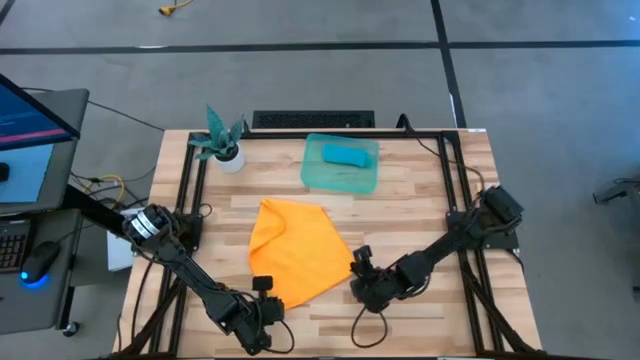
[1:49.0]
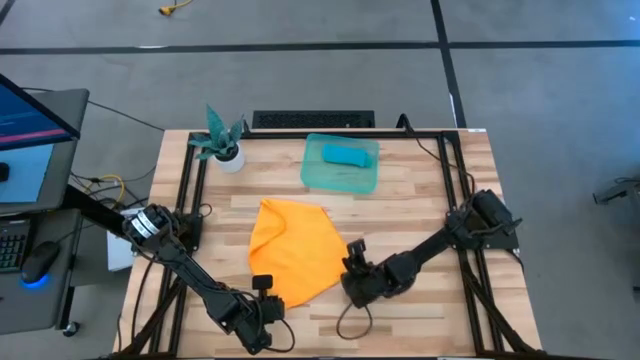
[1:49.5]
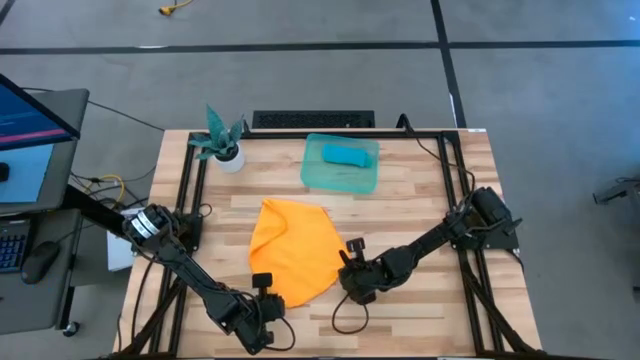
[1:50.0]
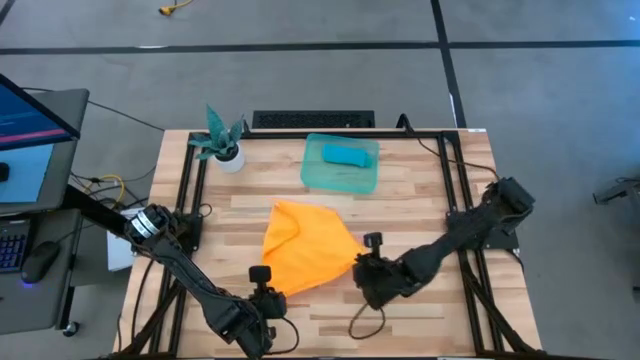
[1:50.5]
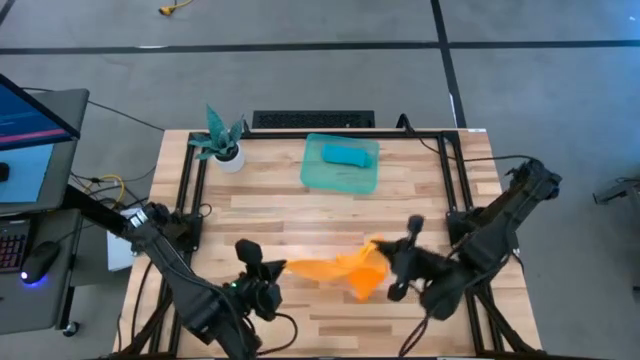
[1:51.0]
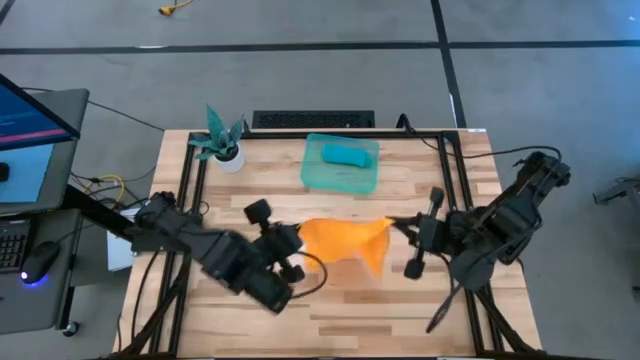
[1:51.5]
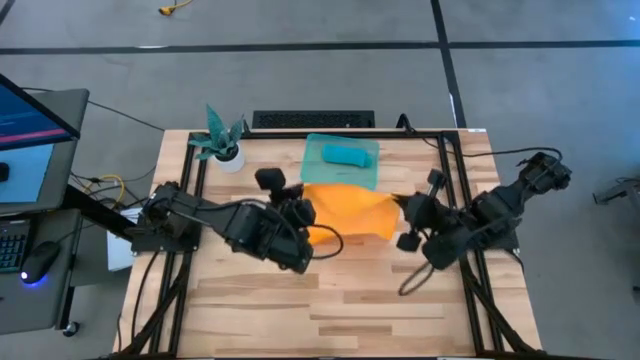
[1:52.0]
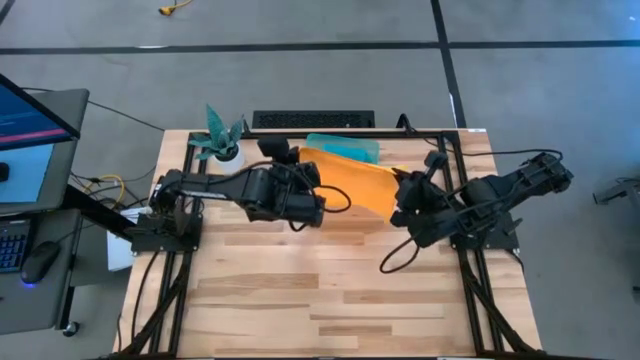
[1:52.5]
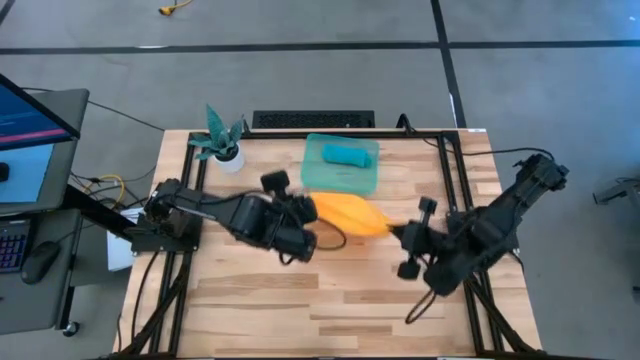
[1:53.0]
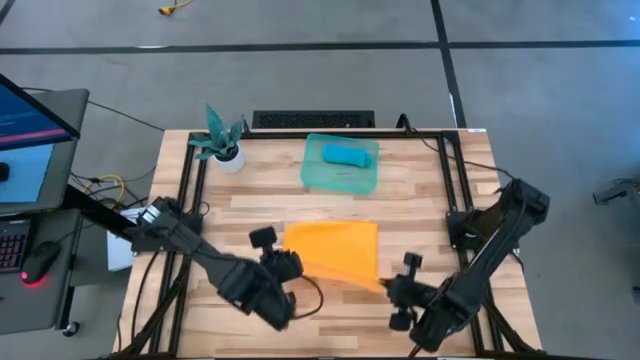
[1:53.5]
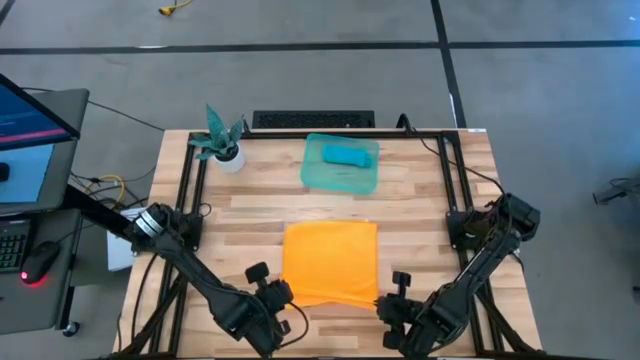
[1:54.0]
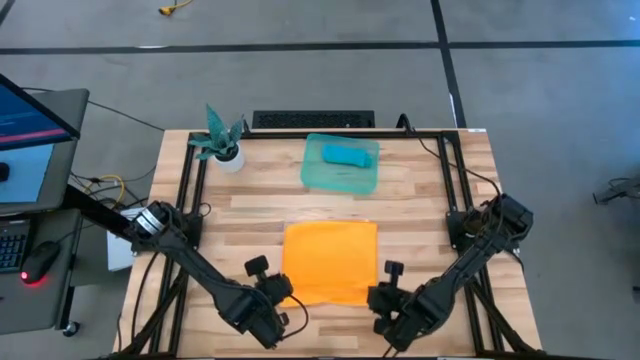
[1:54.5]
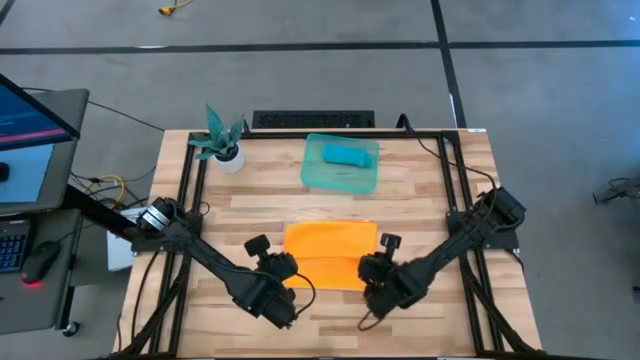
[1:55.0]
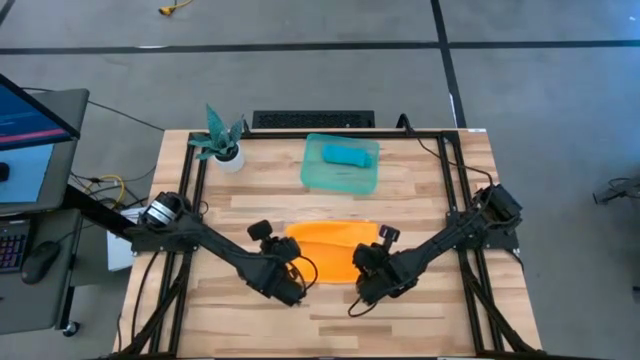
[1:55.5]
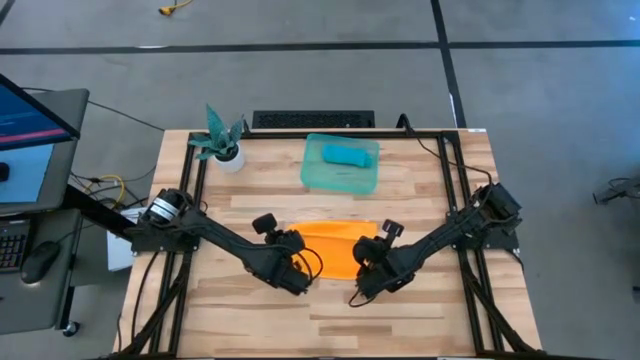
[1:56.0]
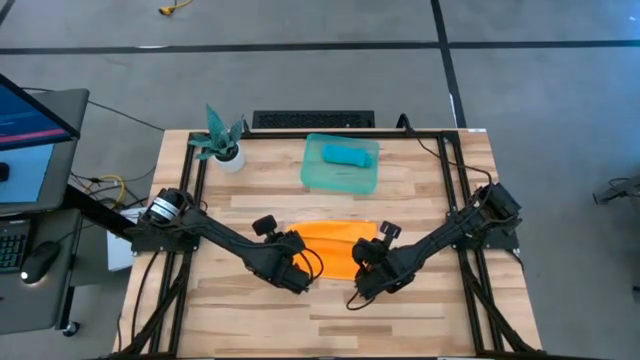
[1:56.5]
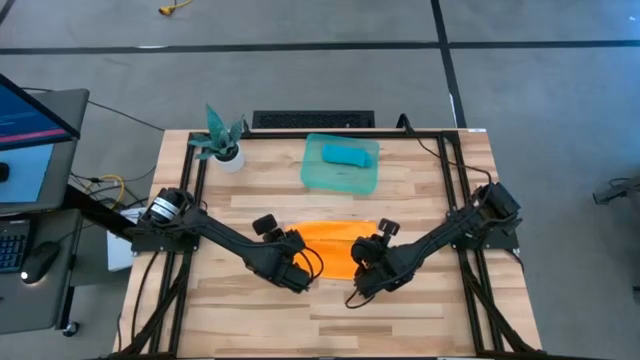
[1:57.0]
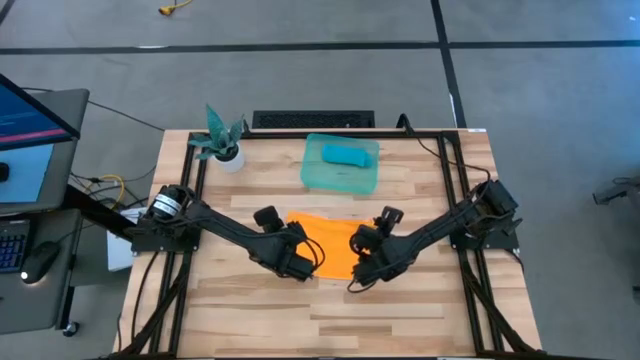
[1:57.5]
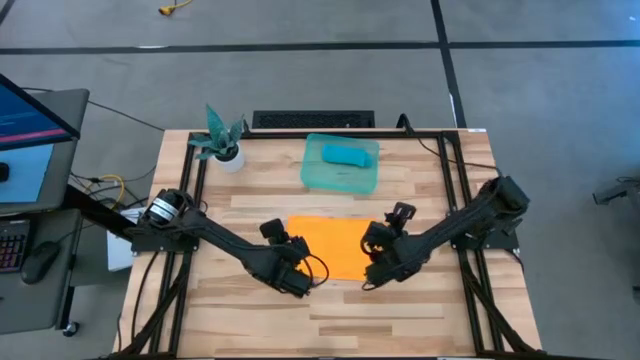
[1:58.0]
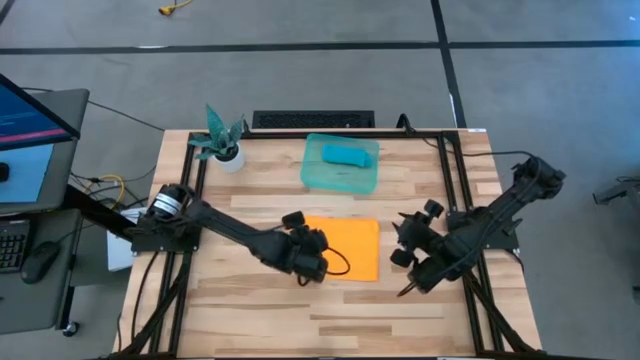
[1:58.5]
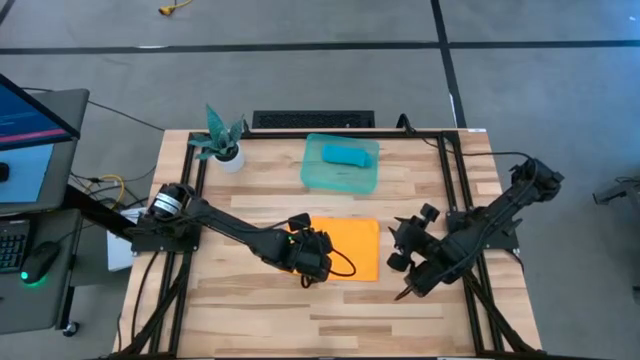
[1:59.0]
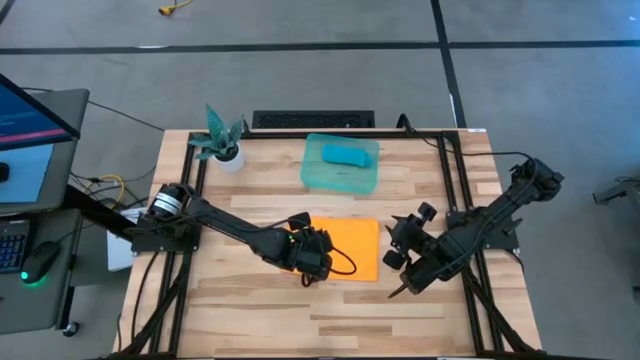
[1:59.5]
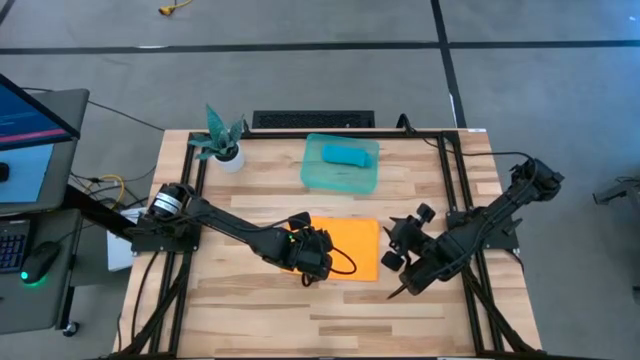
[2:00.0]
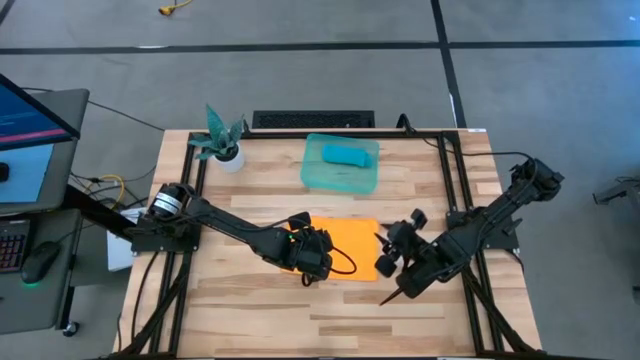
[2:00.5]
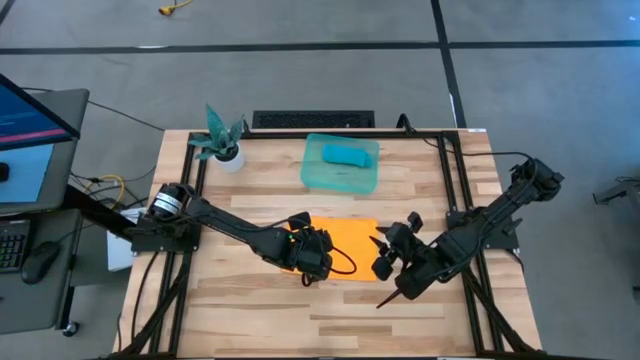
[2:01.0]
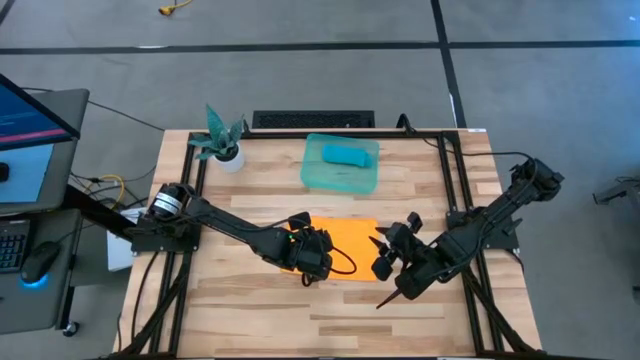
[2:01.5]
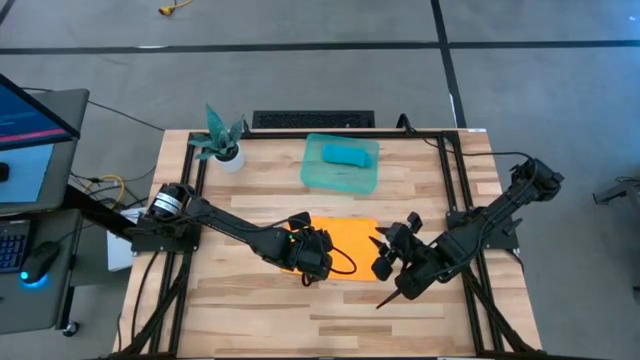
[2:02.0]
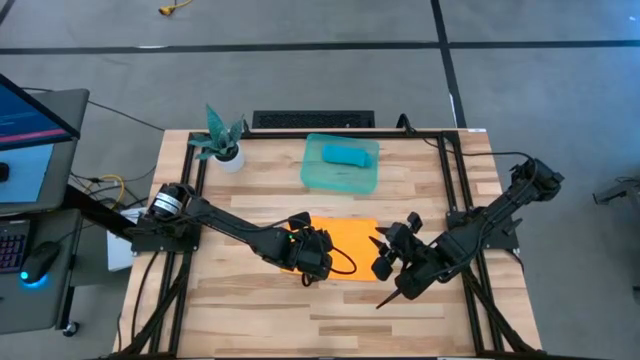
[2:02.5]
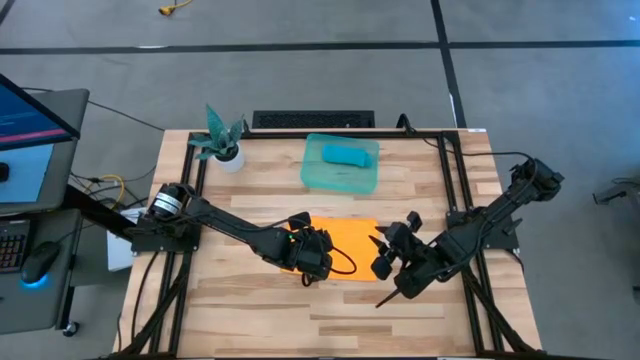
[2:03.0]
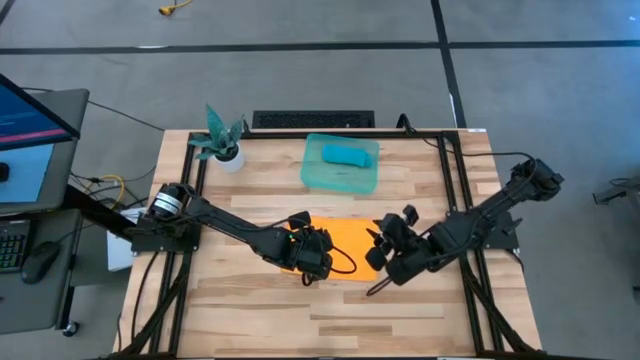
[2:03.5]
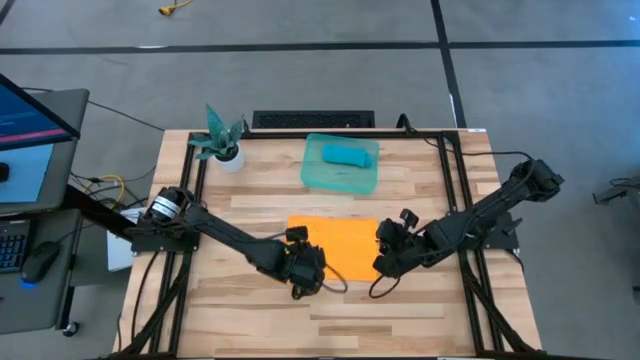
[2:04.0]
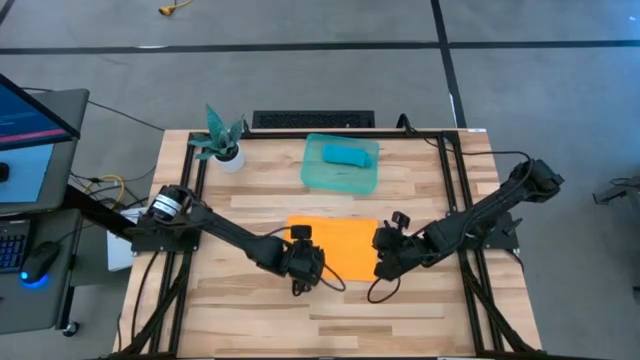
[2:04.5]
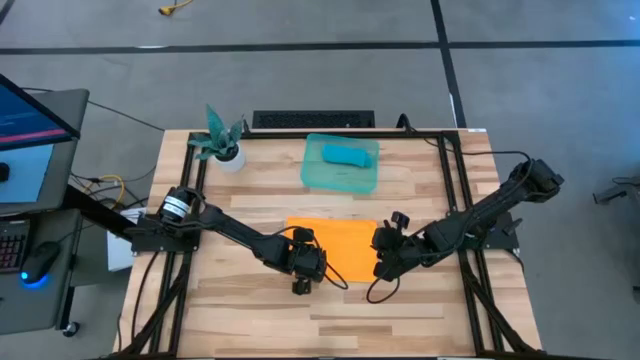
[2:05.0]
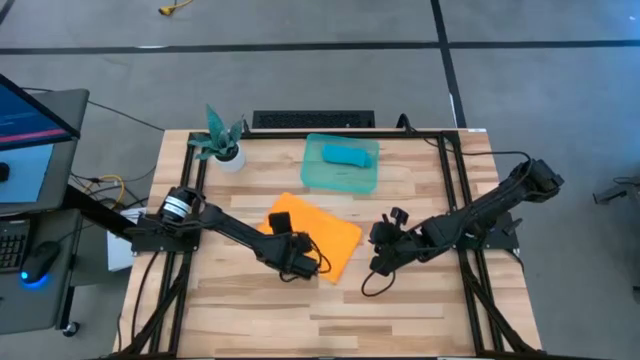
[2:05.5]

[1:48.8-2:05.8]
Task: Roll microfiber towels into tight, uniform cylinder then place into a basket
Fold the yellow microfiber towel

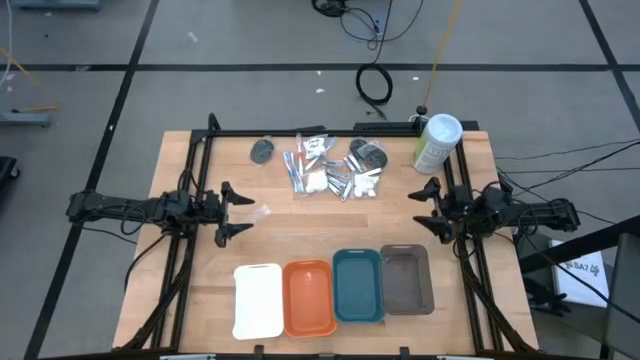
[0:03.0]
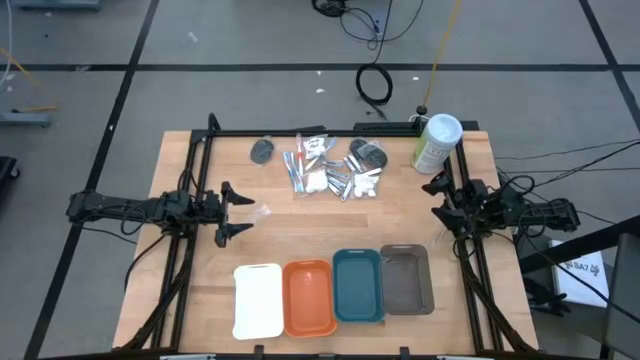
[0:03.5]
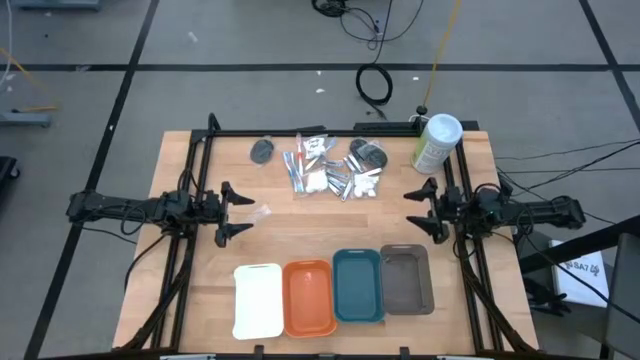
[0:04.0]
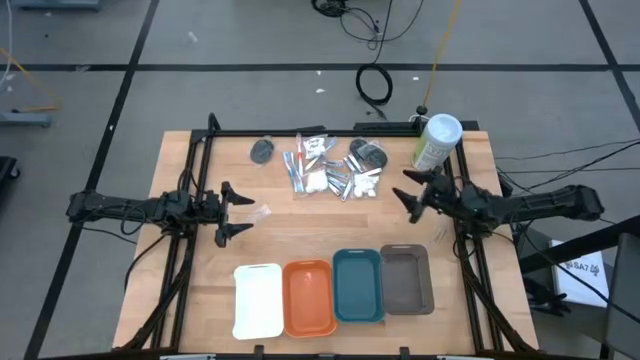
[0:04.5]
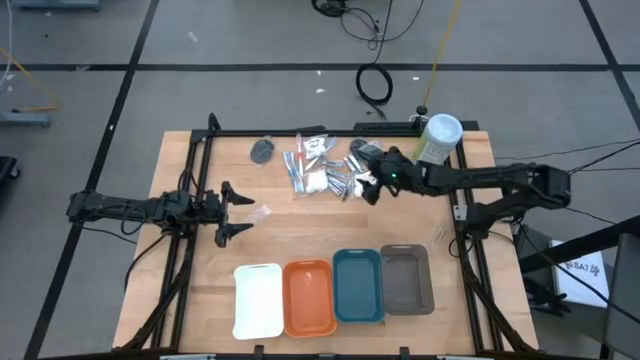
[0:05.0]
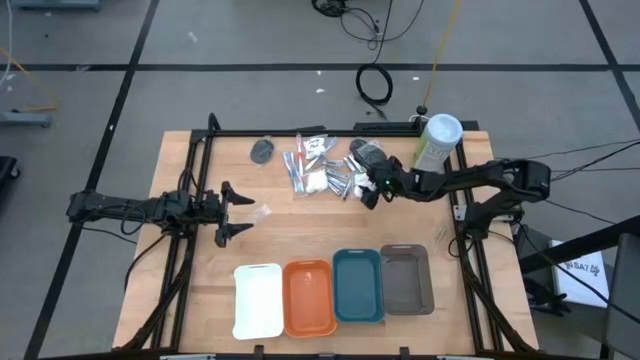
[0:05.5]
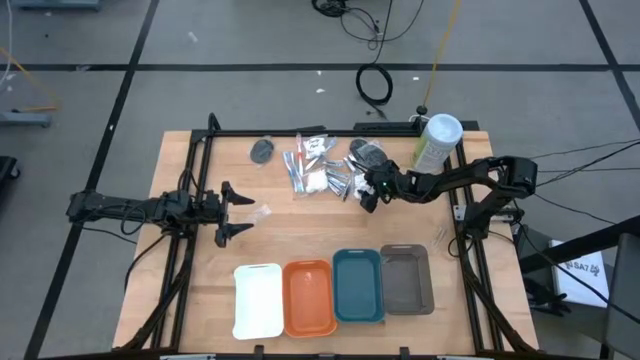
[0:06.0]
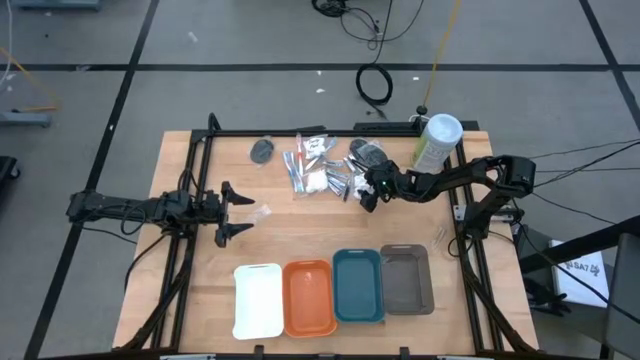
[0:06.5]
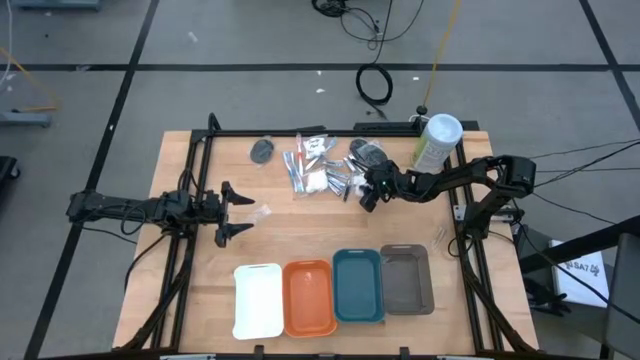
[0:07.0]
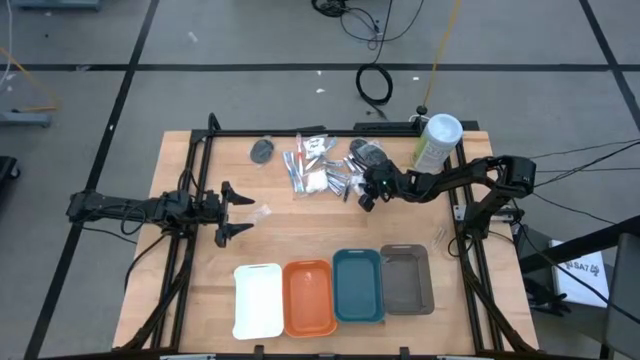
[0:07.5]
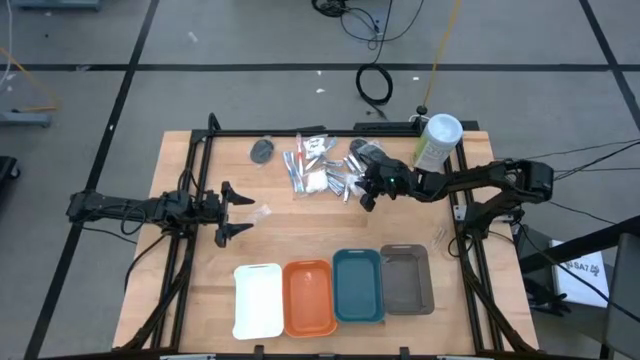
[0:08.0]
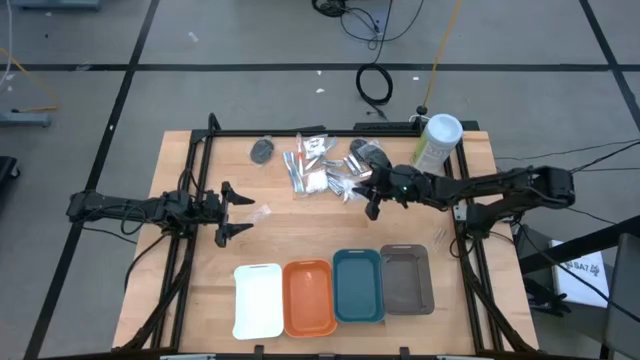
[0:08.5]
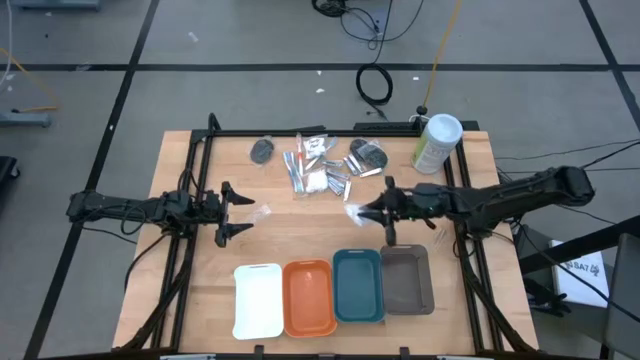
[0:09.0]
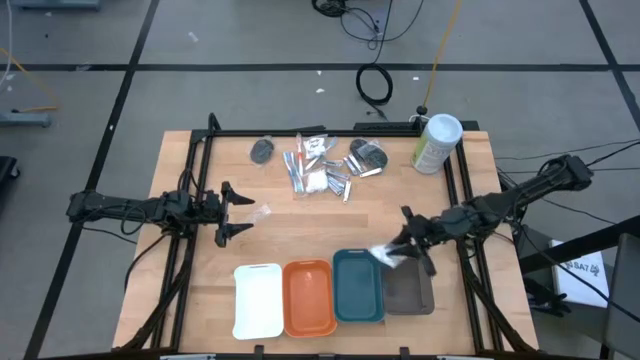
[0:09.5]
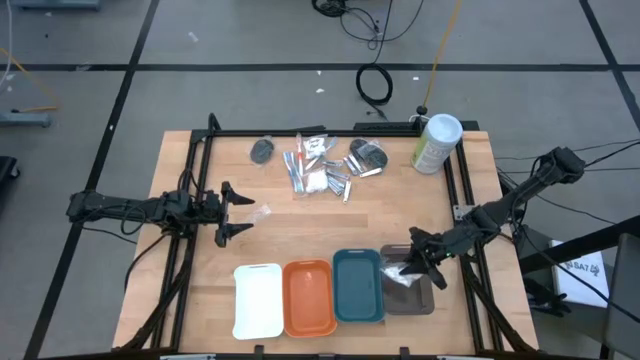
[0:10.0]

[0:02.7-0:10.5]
Task: Pick & Place Travel size toiletries
Put the white cotton pack into the black bin
